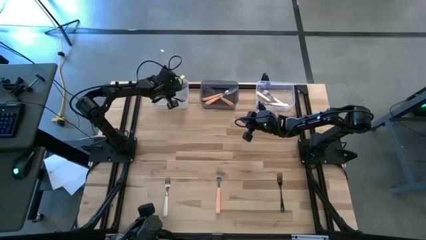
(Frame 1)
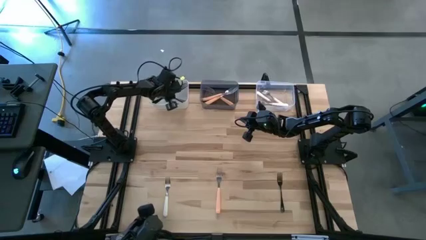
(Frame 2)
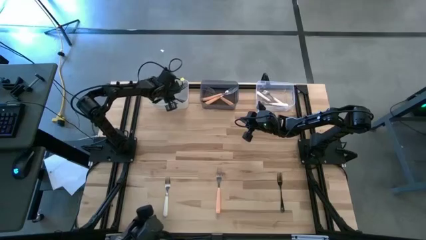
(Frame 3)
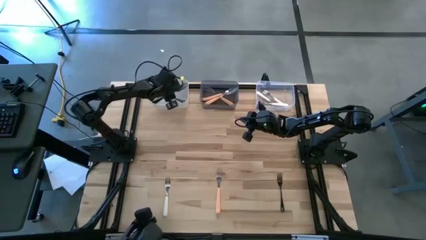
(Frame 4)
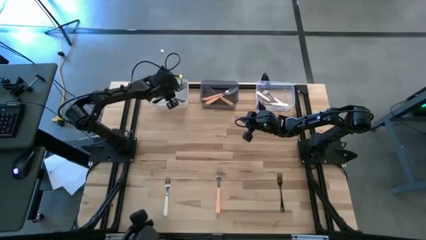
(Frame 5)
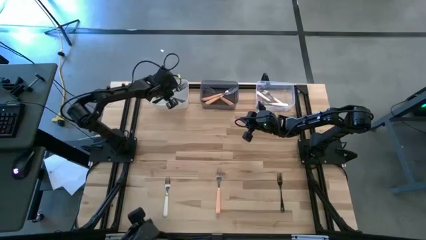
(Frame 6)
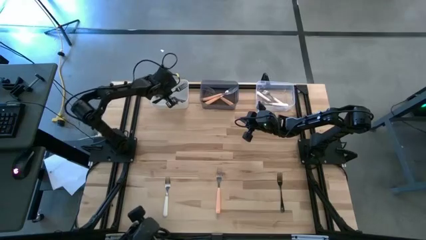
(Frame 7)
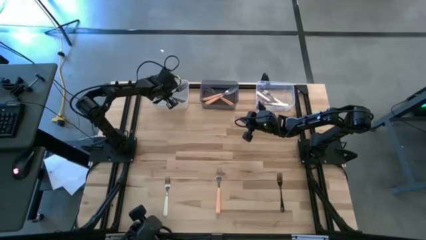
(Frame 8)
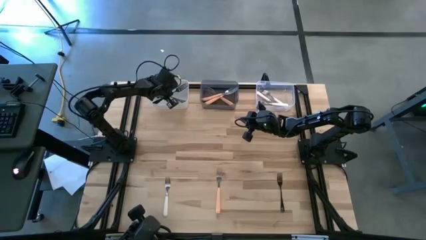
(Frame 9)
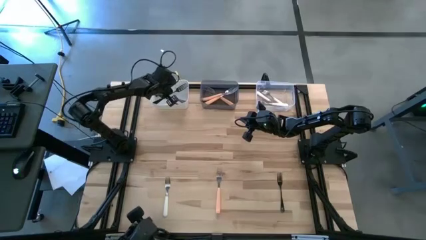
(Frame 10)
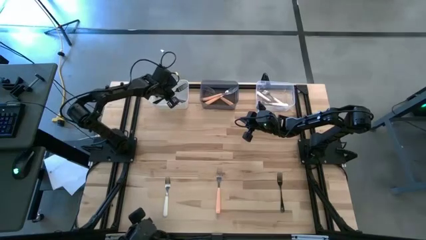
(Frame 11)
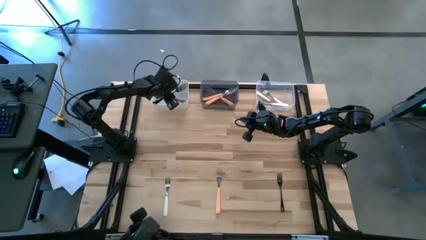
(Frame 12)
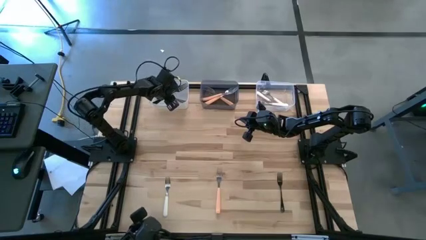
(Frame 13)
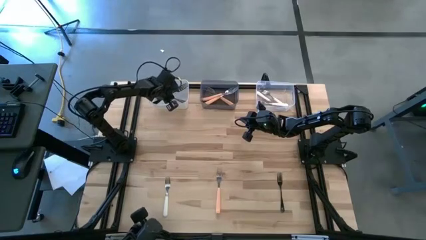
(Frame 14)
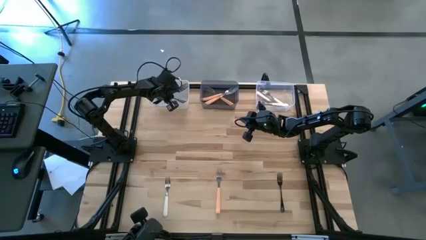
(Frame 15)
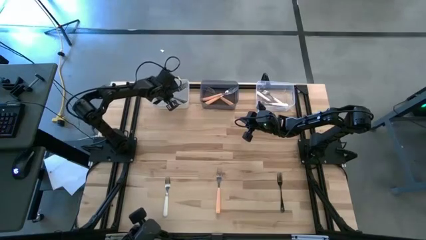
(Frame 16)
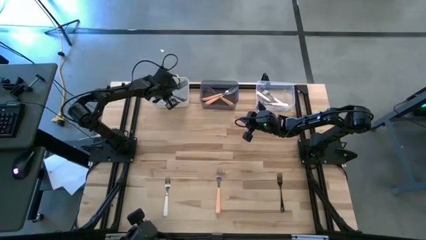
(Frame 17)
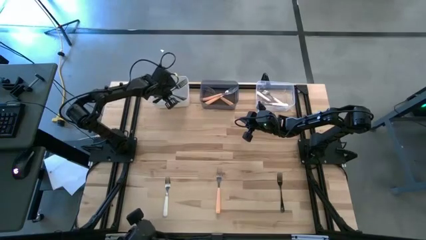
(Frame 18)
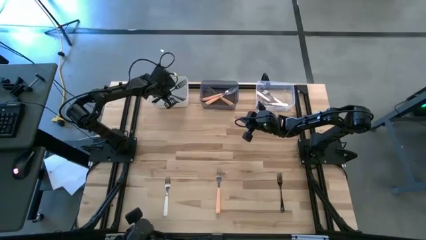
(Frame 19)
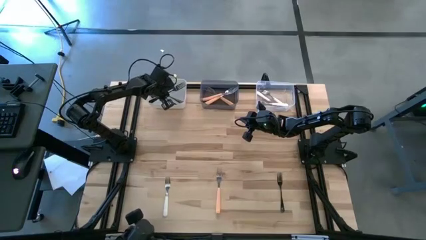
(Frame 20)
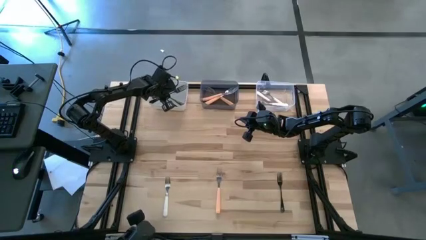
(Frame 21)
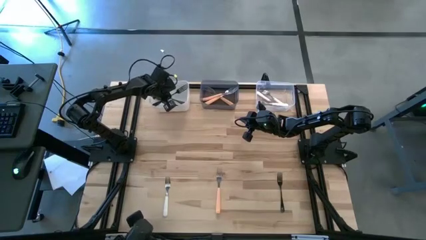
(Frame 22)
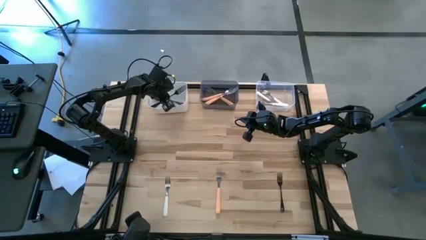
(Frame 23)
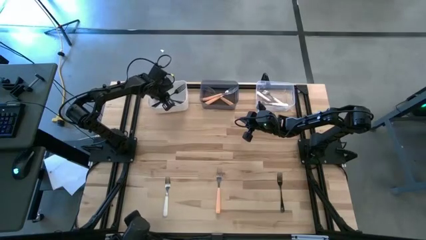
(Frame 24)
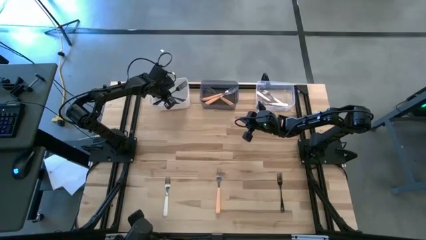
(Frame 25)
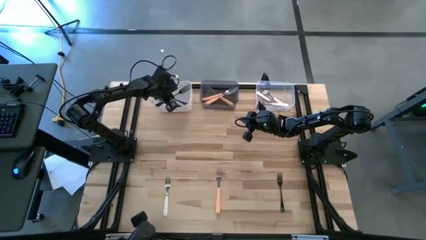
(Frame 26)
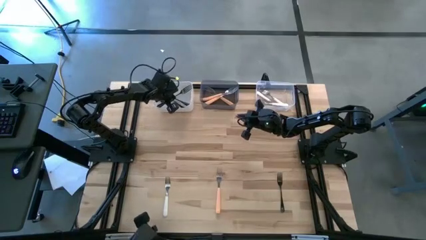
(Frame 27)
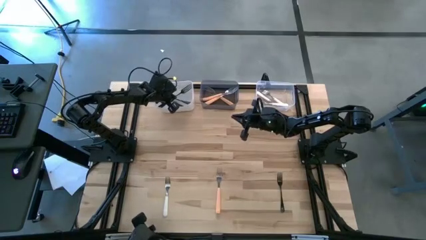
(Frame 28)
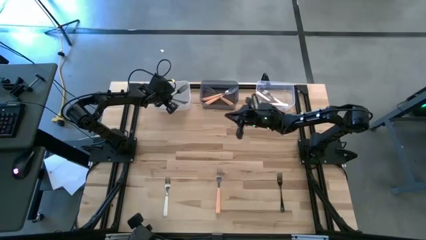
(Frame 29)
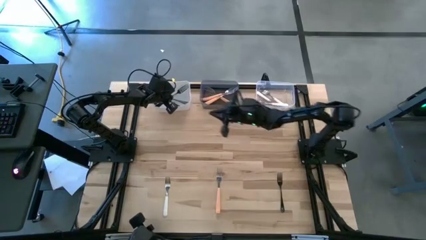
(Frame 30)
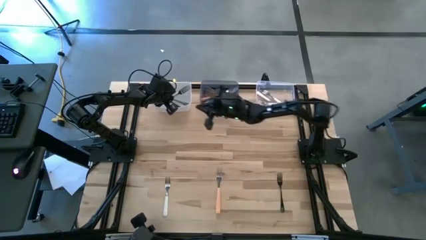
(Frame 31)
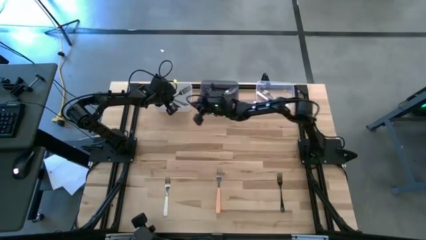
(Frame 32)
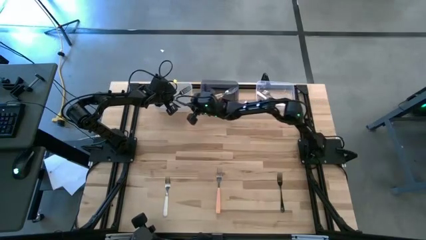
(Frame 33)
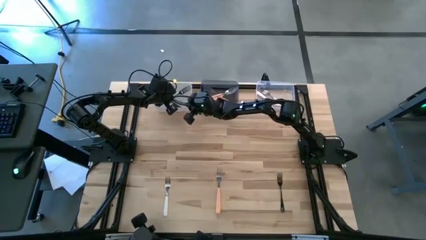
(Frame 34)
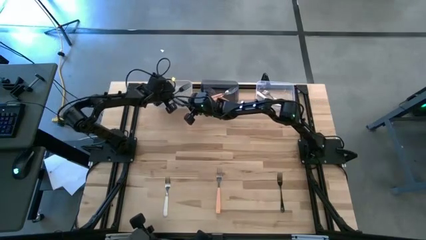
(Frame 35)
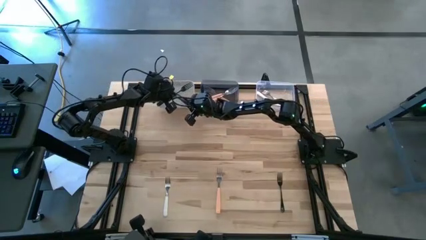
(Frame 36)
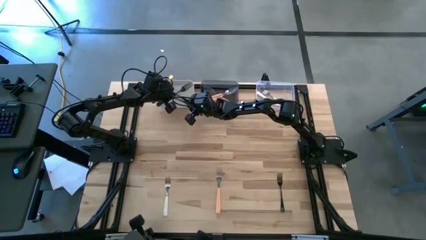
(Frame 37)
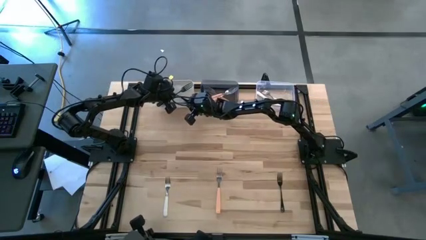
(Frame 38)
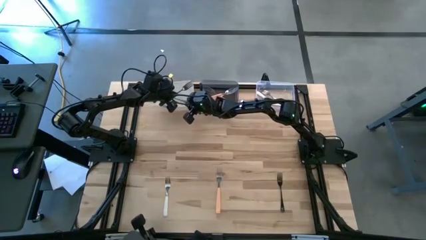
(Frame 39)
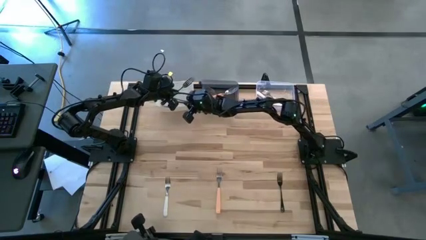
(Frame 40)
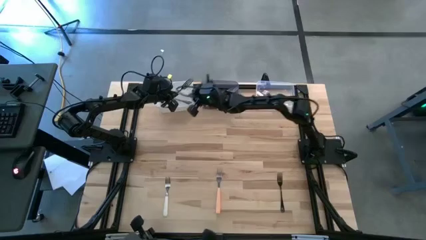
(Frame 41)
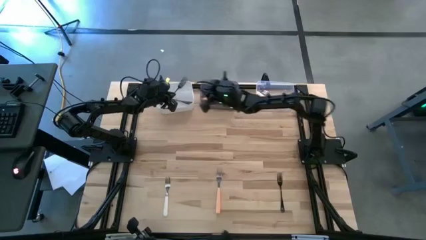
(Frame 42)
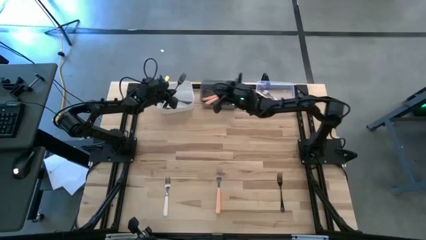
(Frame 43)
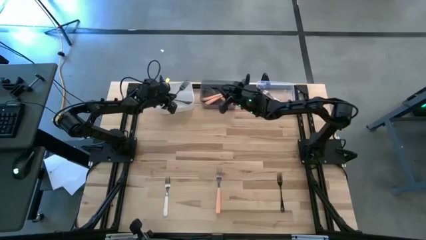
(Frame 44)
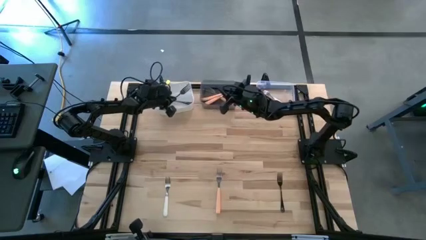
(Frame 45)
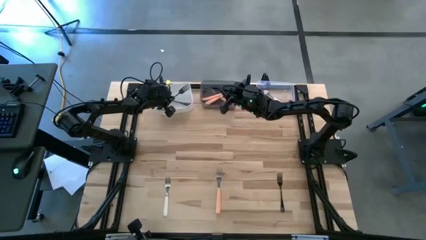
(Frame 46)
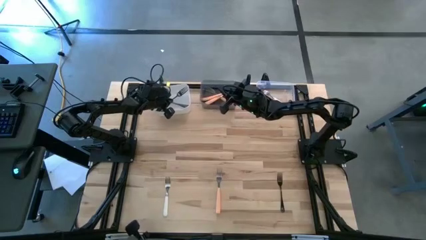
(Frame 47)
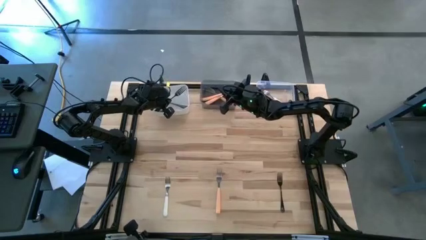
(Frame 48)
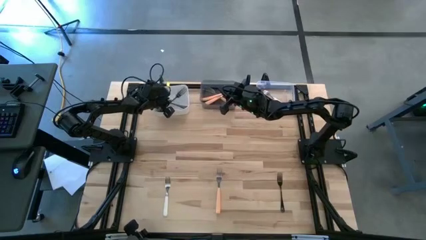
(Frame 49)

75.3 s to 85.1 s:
Task: Sort silverware by color (type)
Put the top black fork into the white bin

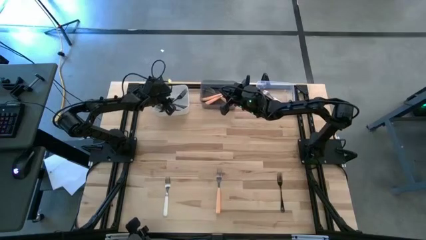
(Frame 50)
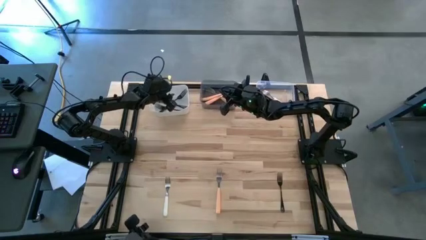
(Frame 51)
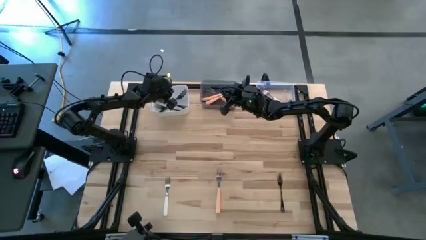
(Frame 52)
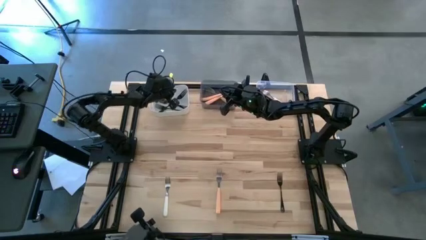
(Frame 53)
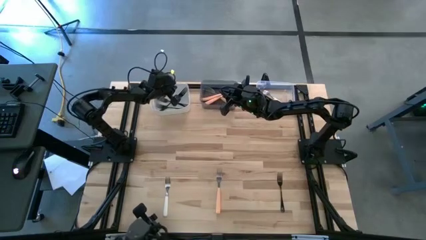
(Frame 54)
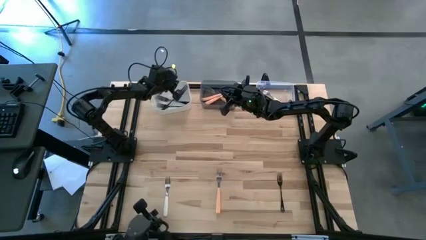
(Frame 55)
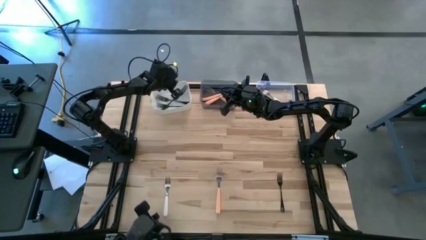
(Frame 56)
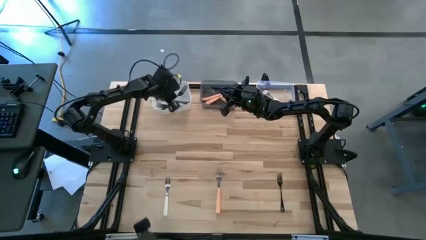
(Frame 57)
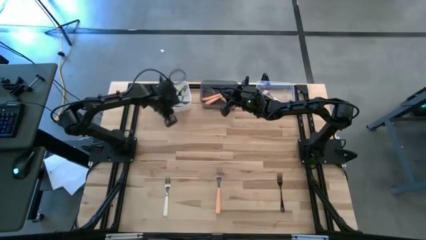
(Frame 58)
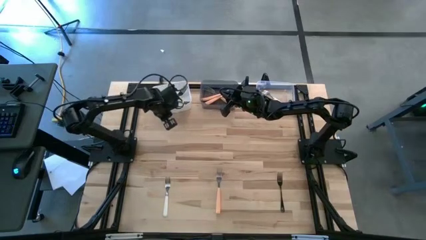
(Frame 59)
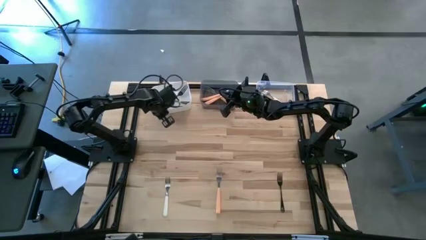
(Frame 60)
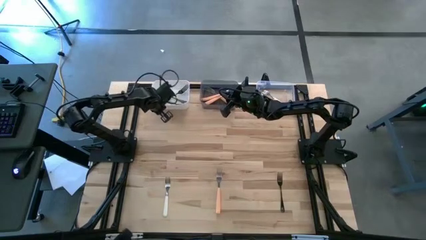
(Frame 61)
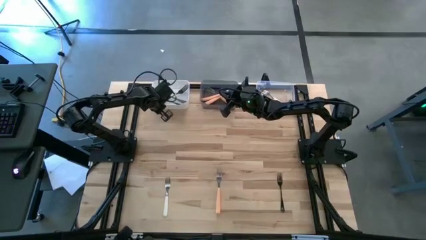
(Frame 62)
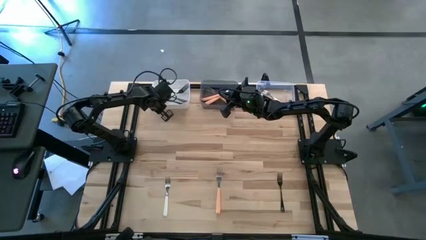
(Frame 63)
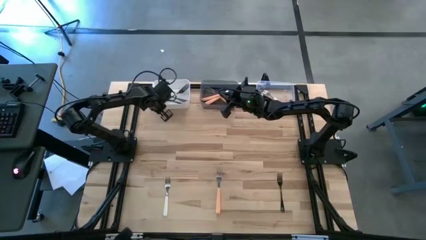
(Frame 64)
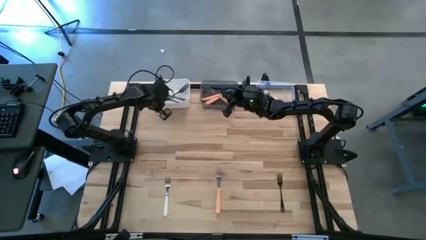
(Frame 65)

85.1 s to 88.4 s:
Adjust the white bin

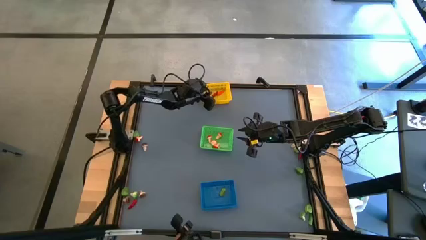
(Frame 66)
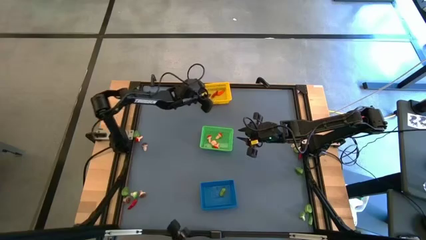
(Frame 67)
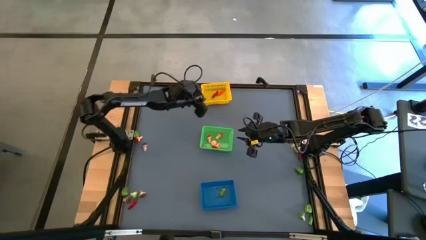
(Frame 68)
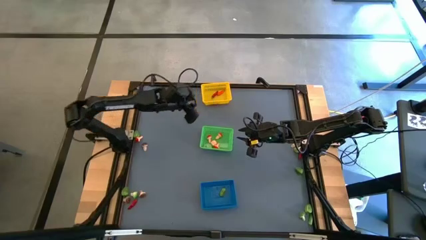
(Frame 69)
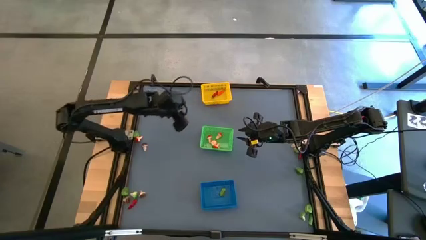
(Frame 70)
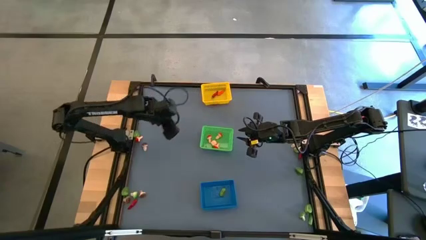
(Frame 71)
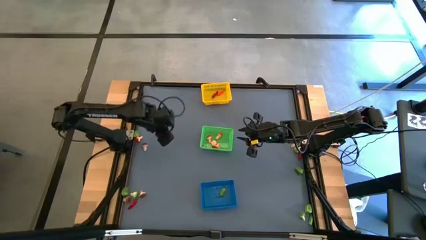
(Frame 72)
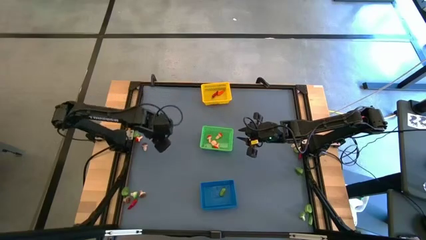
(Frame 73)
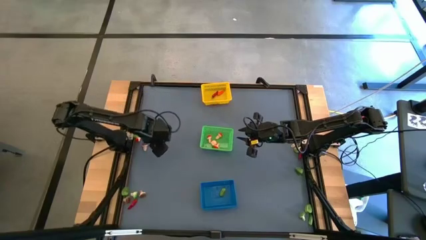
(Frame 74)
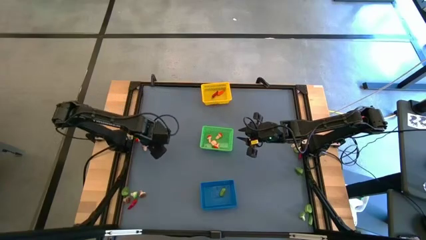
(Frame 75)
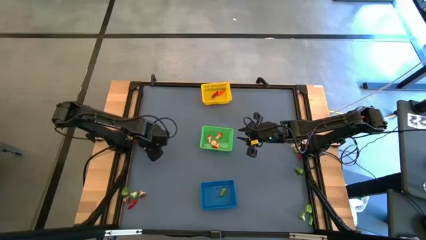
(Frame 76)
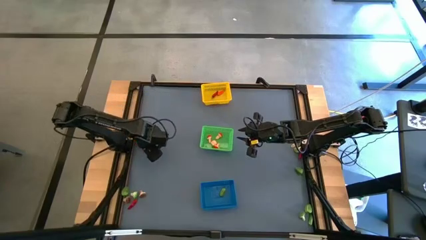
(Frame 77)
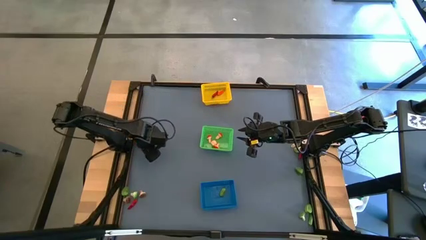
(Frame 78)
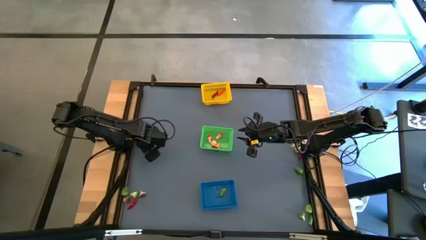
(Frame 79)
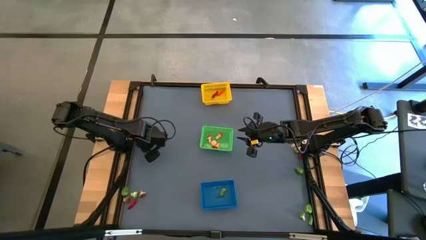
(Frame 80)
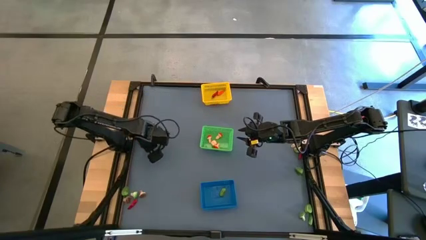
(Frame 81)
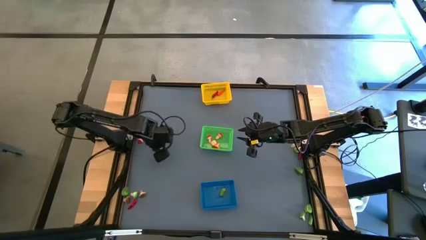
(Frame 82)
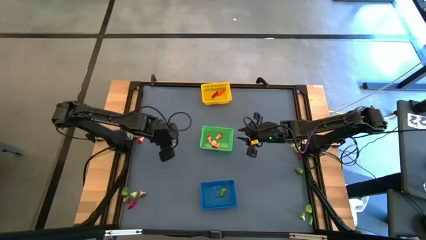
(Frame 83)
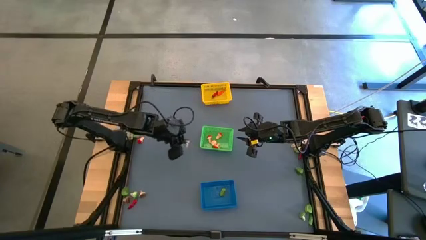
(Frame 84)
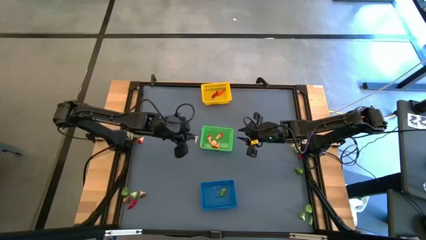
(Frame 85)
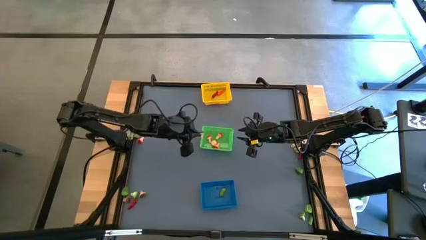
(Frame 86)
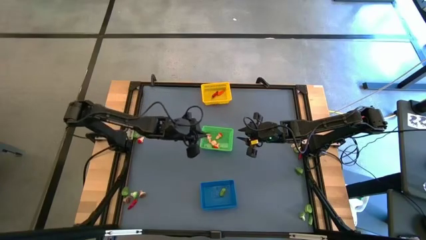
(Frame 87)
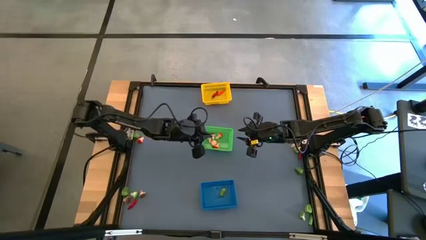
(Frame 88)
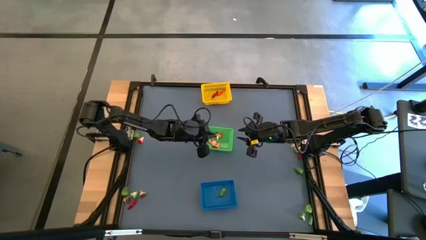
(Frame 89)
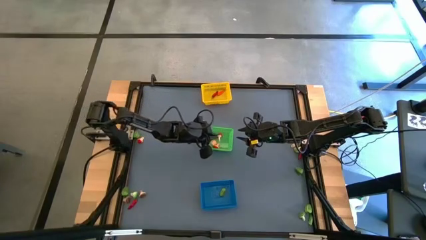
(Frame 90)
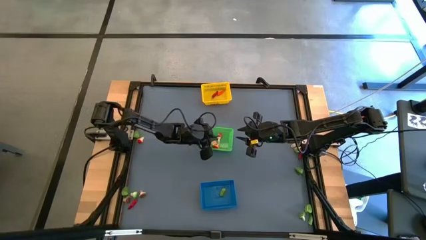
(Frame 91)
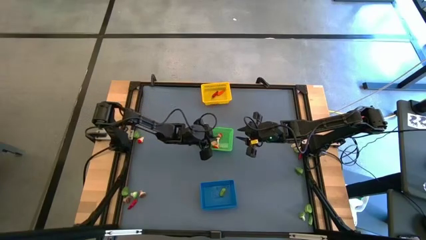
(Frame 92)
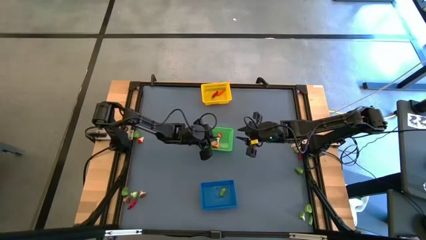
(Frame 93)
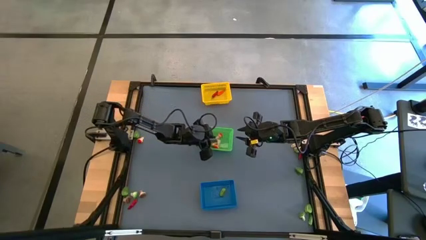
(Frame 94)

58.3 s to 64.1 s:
Task: Sort produce into baskets
Put the brown mushroom into the green bin
